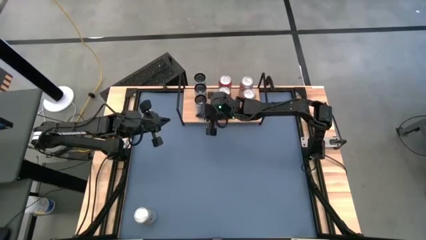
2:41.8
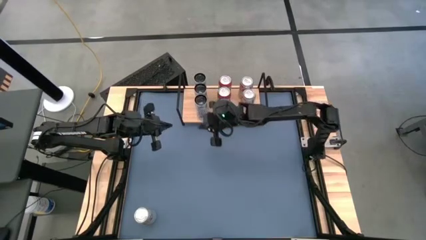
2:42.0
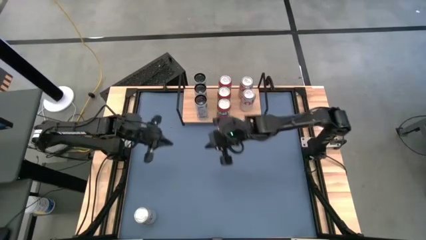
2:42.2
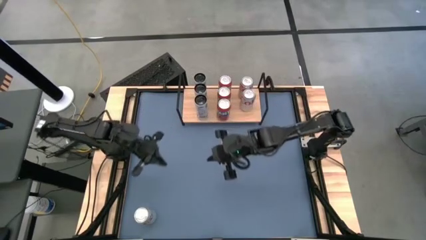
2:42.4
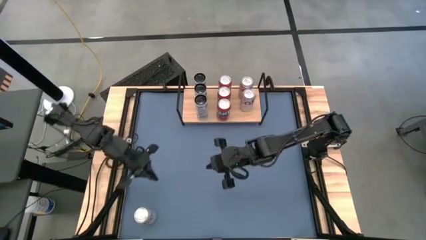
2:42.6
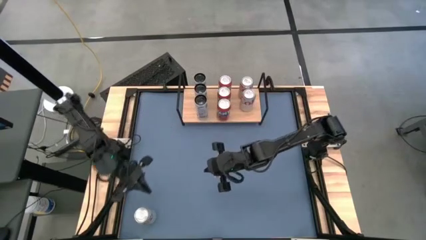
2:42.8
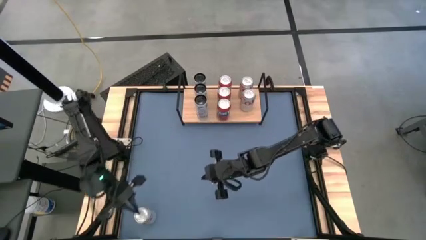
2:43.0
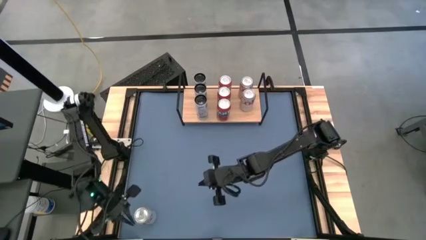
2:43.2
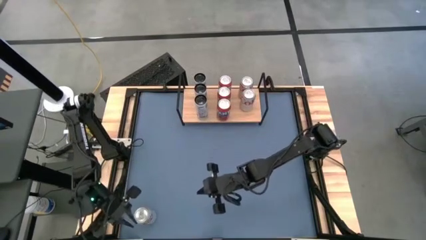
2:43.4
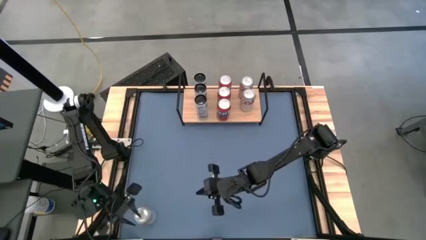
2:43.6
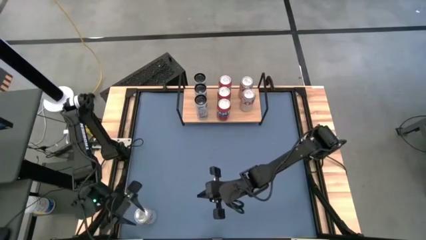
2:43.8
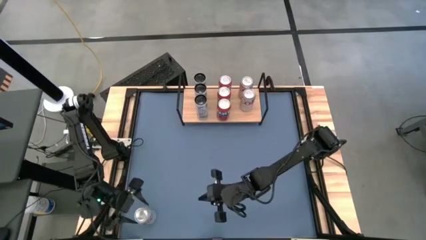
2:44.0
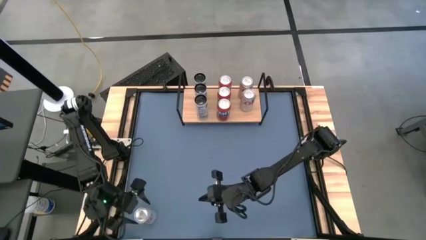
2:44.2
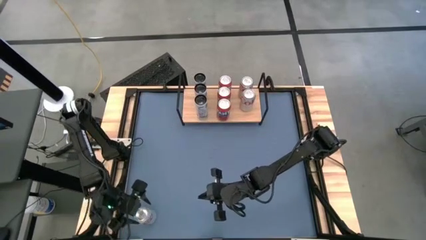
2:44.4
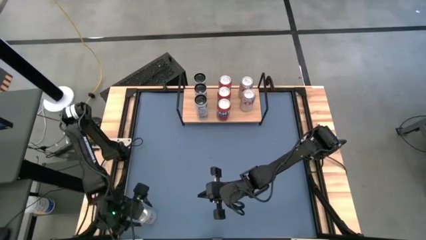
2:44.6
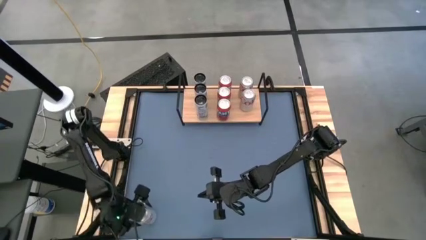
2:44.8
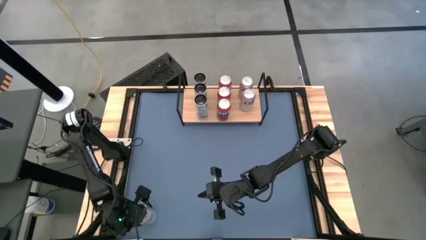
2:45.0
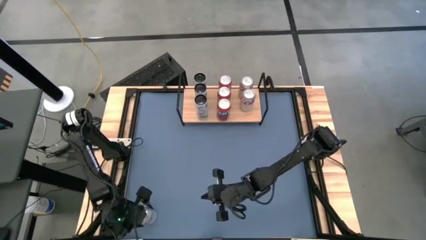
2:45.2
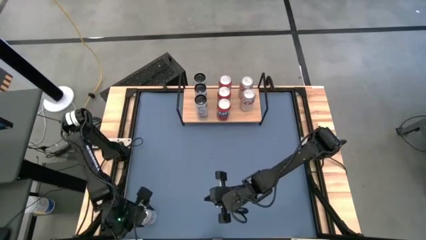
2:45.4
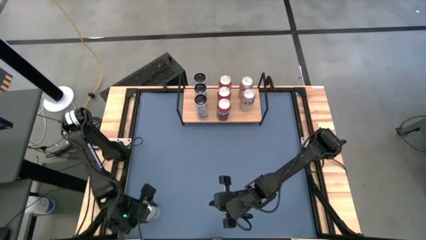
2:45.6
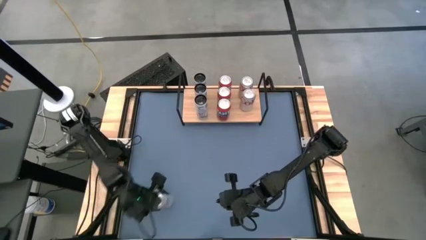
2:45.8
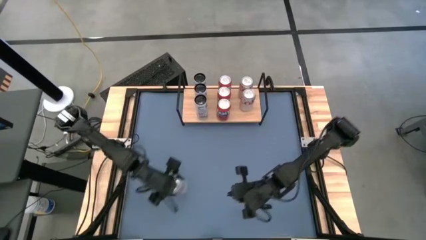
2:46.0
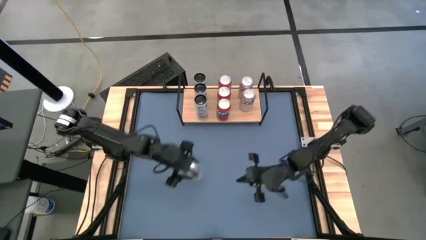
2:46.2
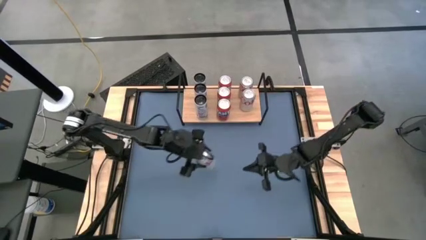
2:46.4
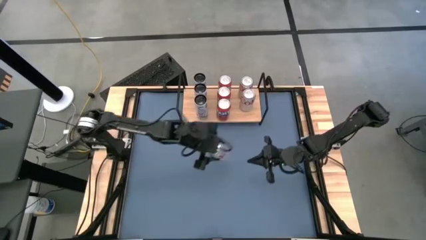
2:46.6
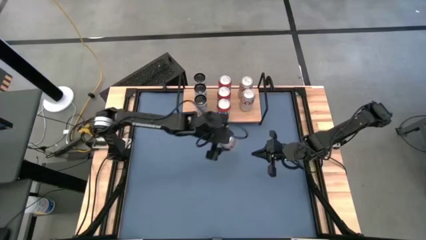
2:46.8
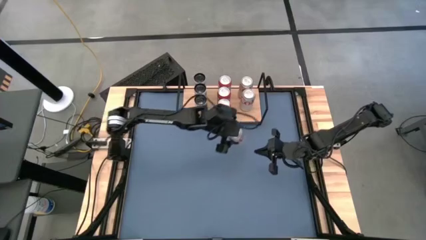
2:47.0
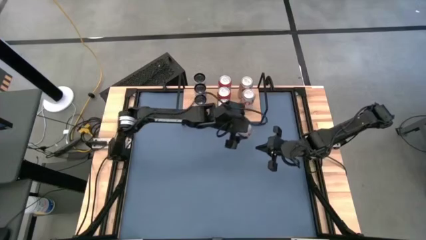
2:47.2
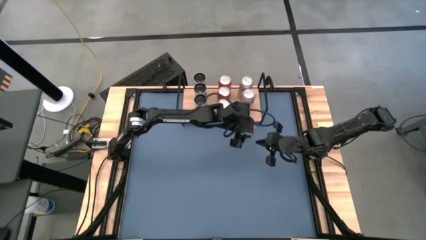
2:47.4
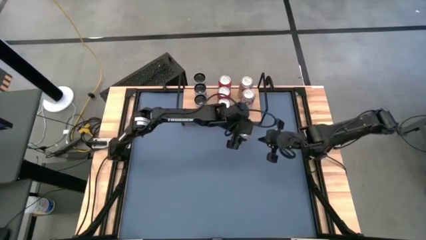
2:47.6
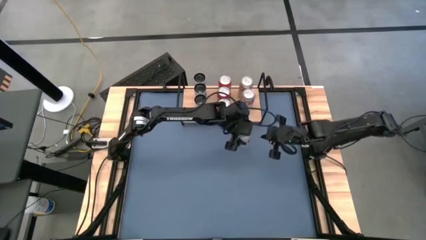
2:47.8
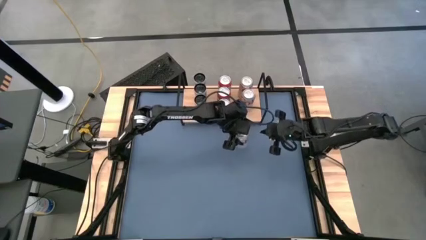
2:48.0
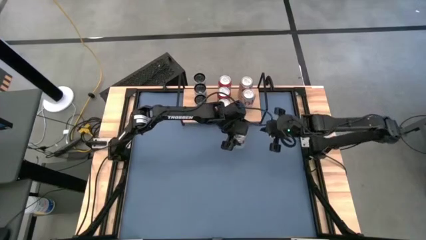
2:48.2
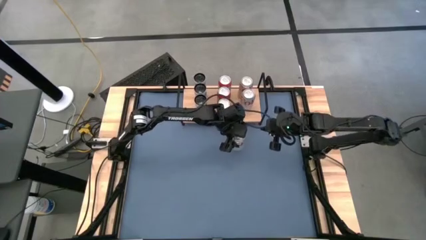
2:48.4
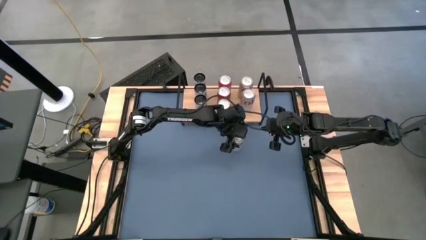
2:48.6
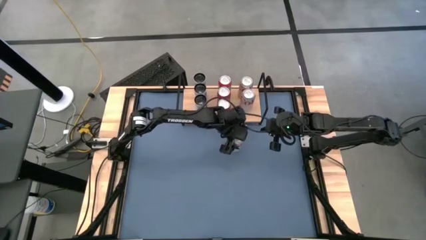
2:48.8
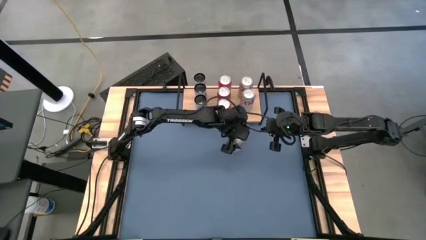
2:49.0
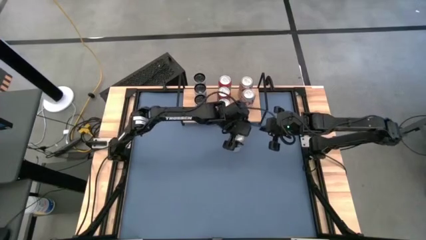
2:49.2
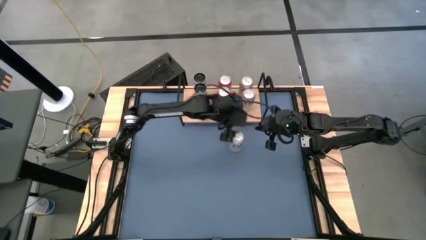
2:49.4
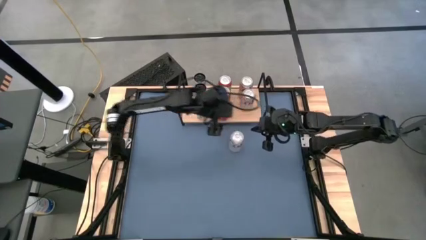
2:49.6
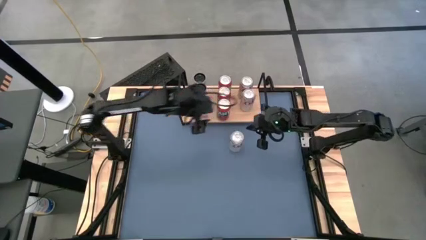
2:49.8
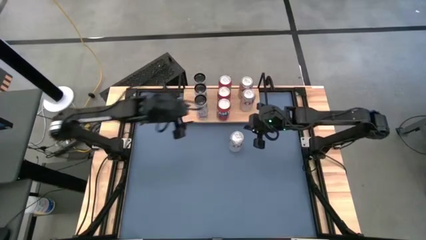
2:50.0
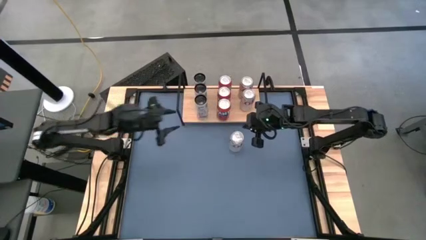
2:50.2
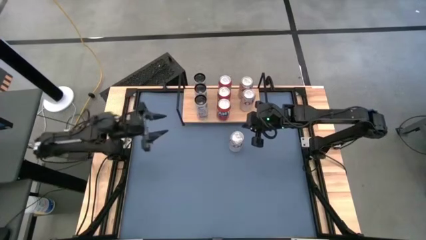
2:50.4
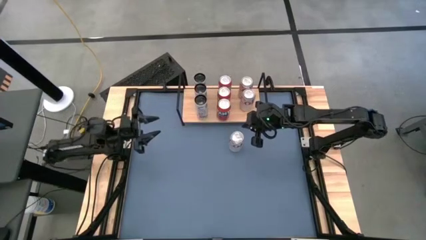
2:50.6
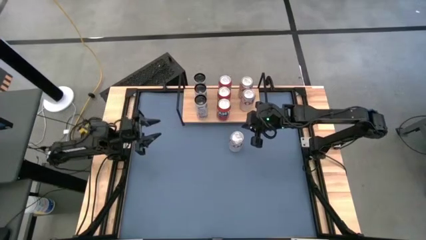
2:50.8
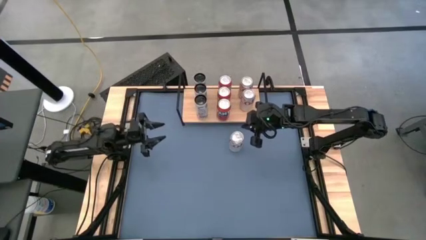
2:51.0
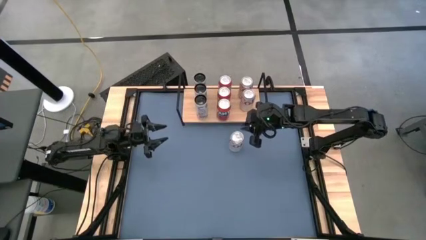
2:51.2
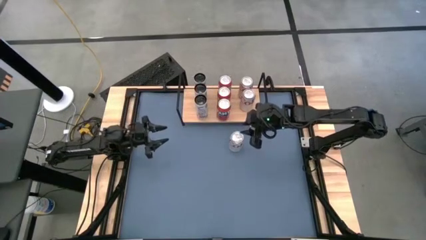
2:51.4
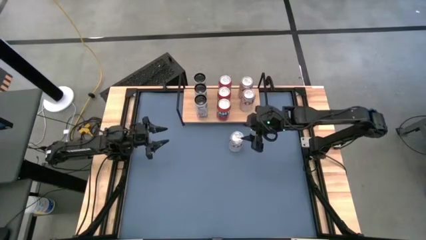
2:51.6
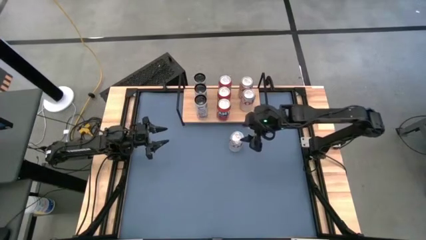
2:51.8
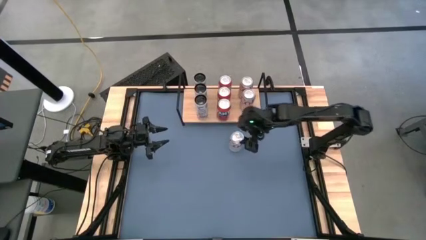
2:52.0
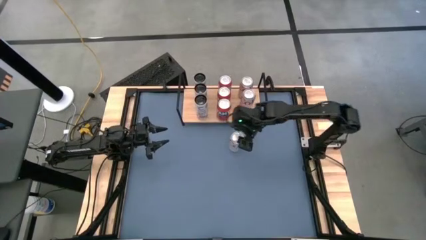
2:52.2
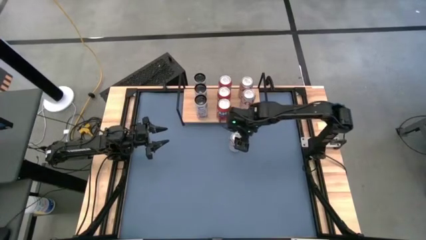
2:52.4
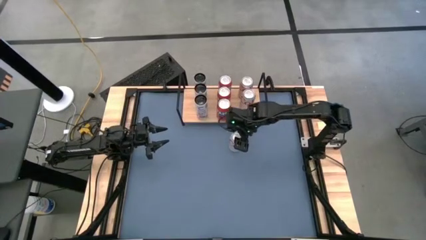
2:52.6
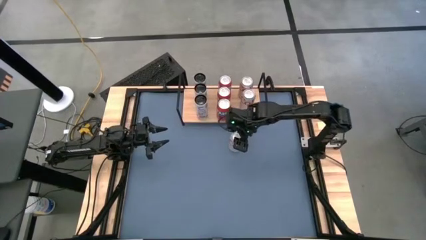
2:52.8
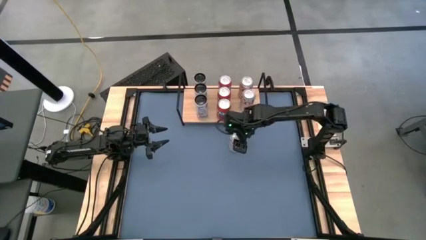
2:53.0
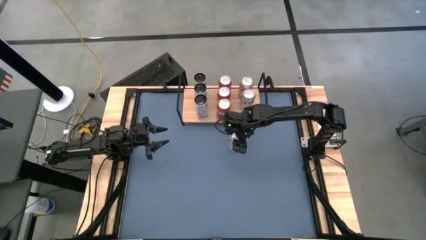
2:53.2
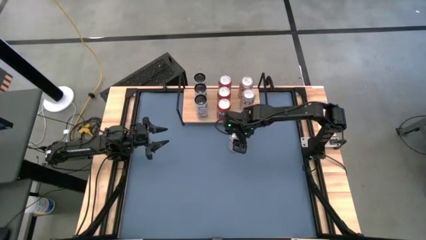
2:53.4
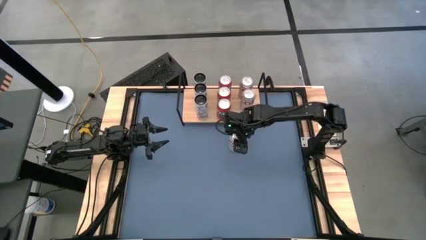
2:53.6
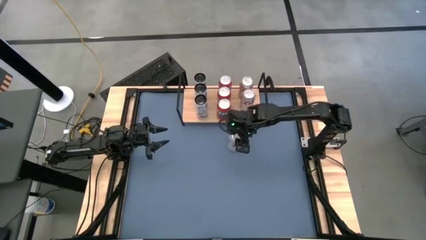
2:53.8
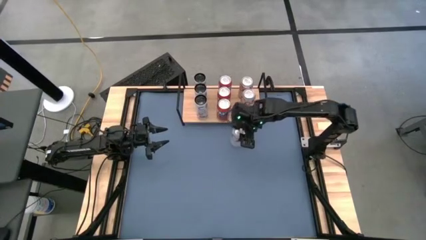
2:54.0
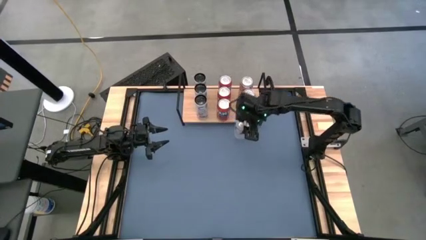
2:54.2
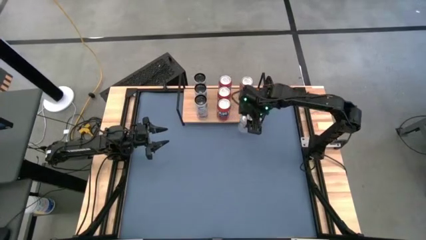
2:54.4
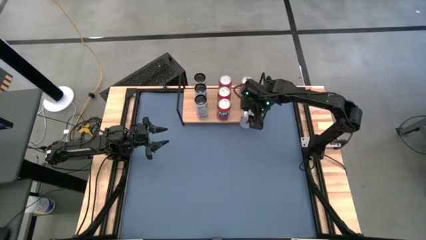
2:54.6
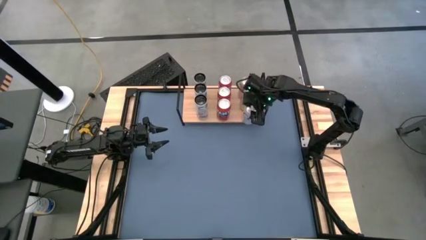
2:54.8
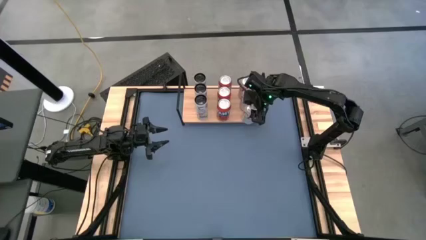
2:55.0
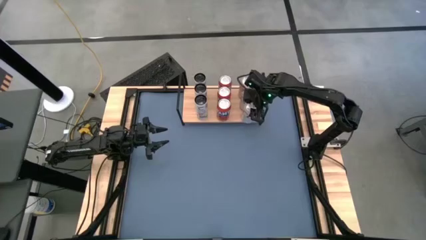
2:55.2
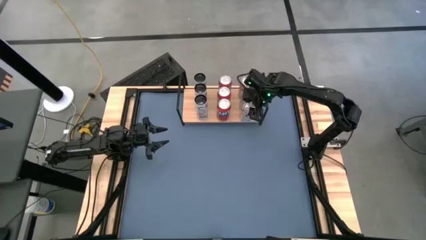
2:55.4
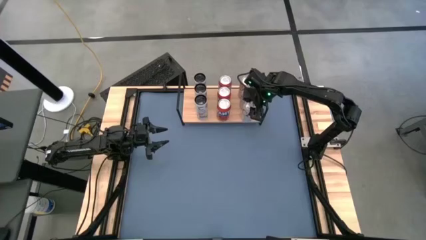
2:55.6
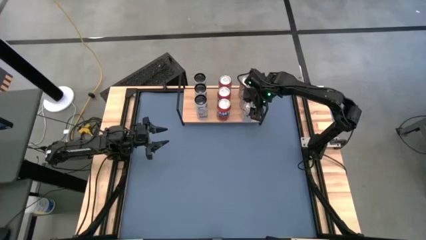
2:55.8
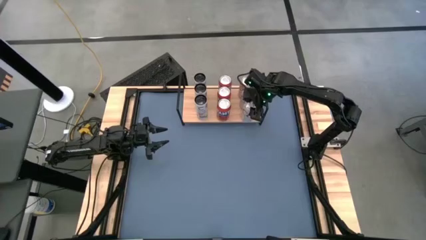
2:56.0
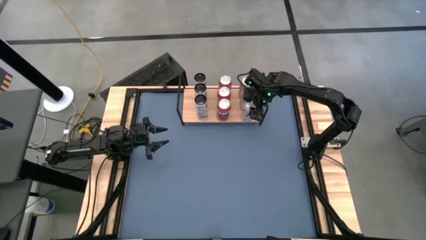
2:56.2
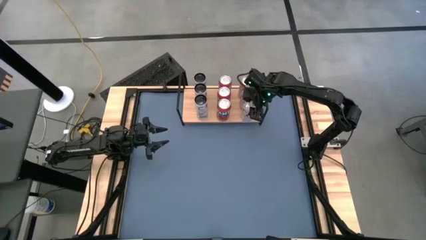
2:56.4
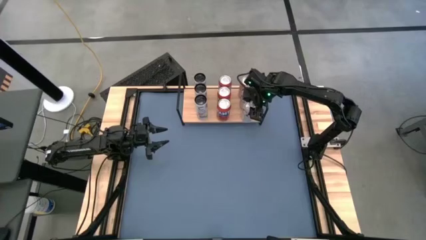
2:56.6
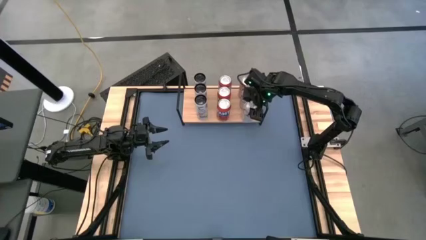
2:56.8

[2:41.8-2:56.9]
Task: Place canned beverage on shelf
Put the silver soda can on the shelf aligned with the other silver soda can

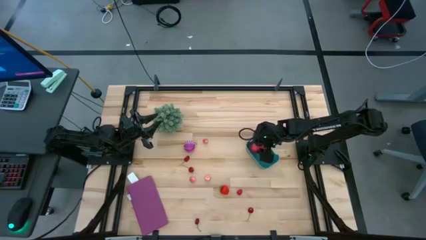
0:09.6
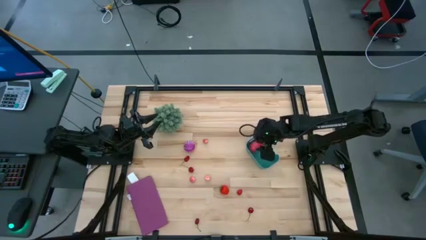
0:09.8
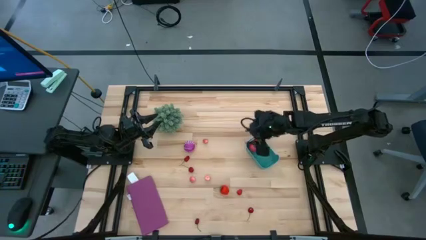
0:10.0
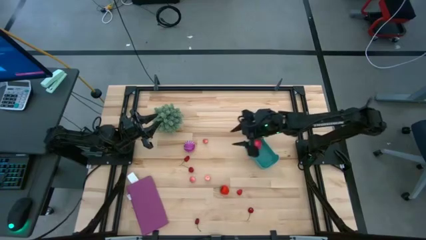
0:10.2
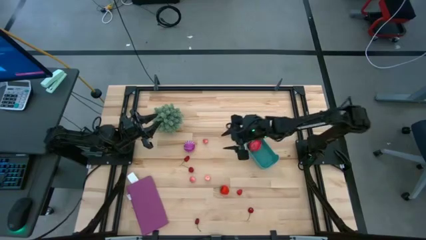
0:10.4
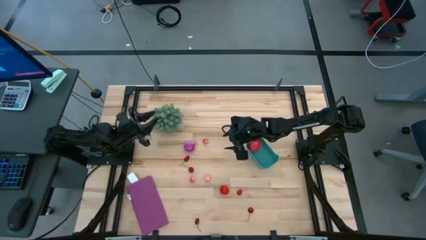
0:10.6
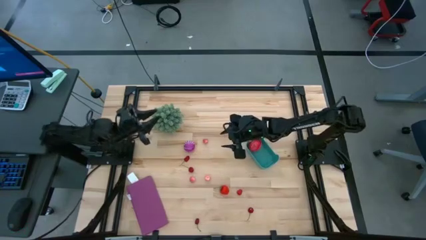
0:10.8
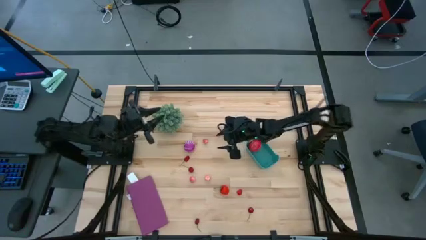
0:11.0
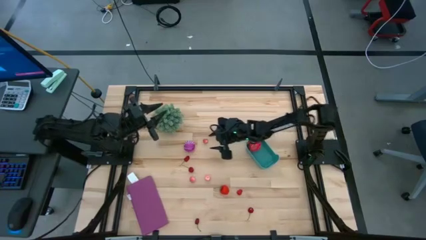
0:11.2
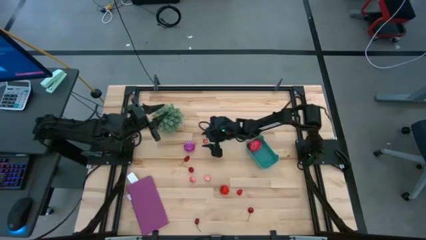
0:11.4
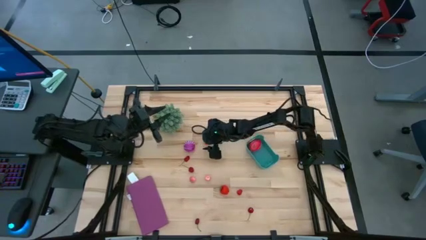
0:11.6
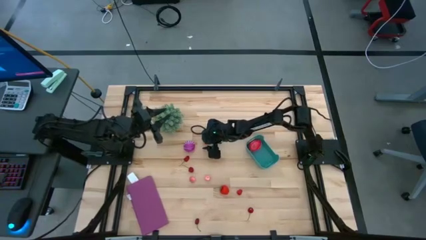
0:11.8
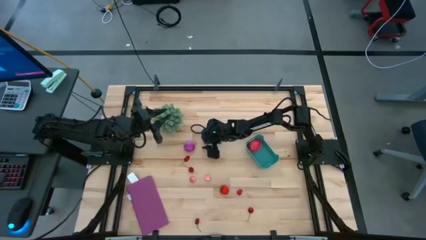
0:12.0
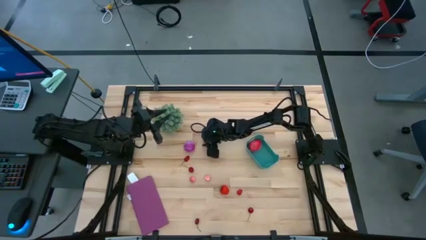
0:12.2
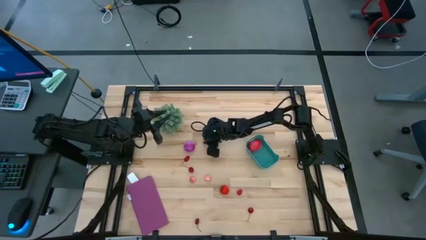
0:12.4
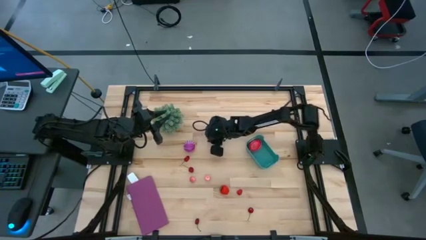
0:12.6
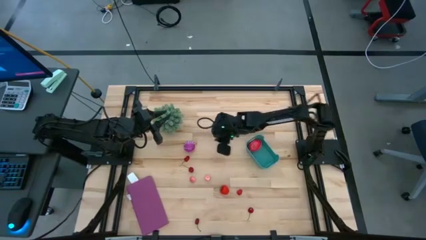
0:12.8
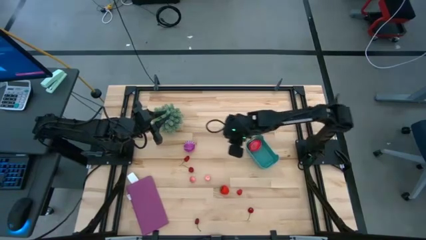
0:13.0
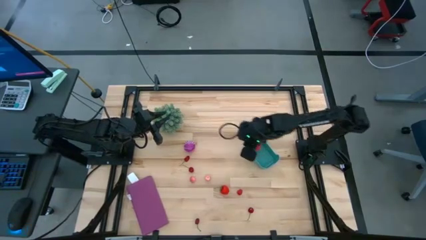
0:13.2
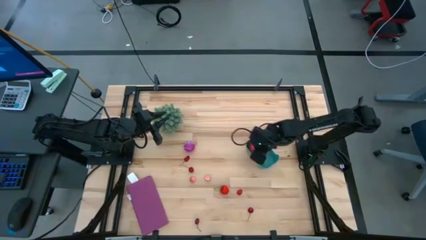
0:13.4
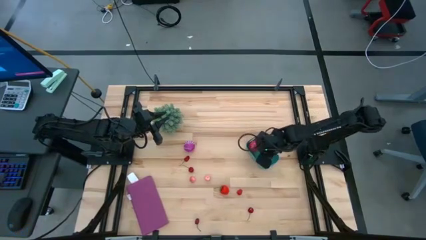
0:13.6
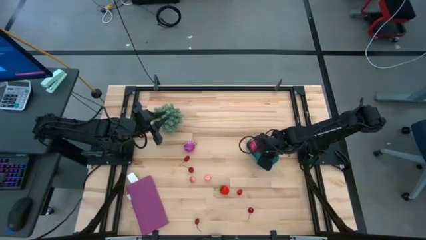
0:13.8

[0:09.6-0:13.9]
Task: Pick and placing Produce into tupperware
Put the apricot in the basket
